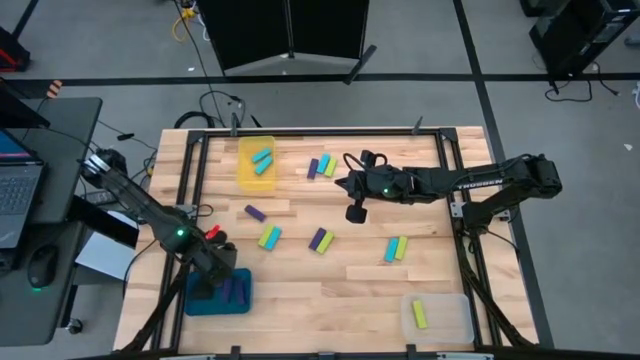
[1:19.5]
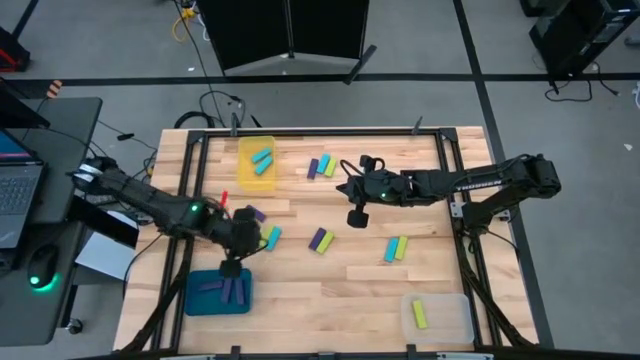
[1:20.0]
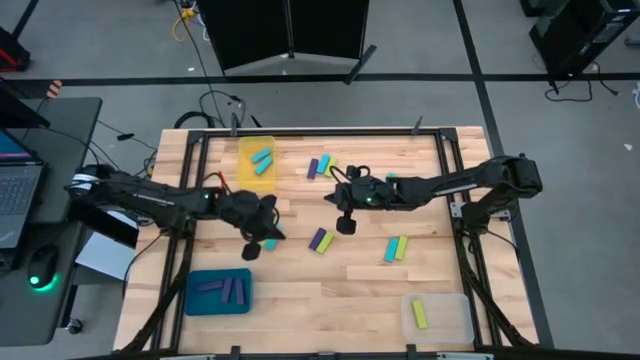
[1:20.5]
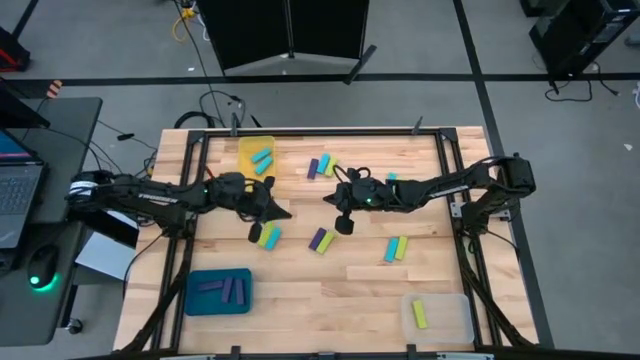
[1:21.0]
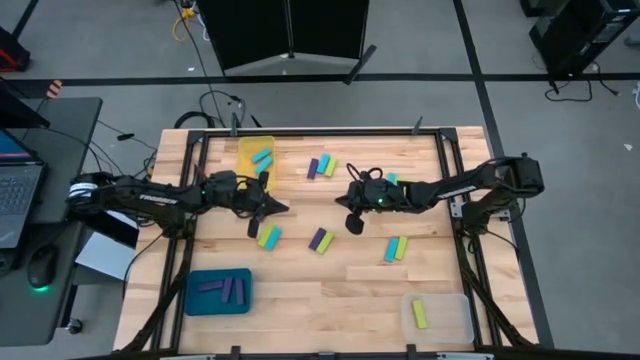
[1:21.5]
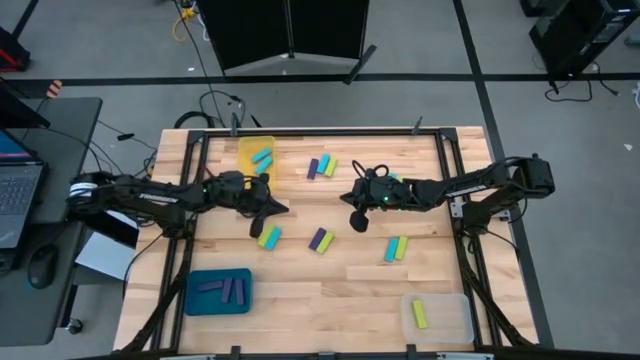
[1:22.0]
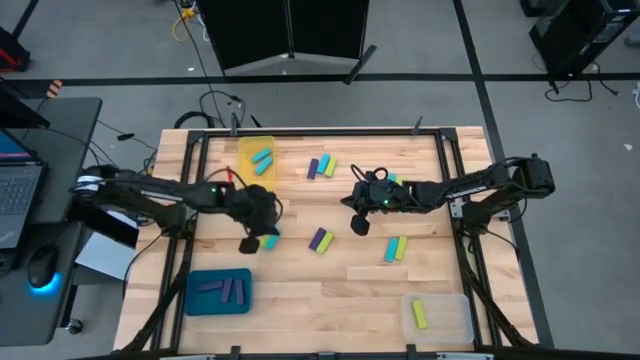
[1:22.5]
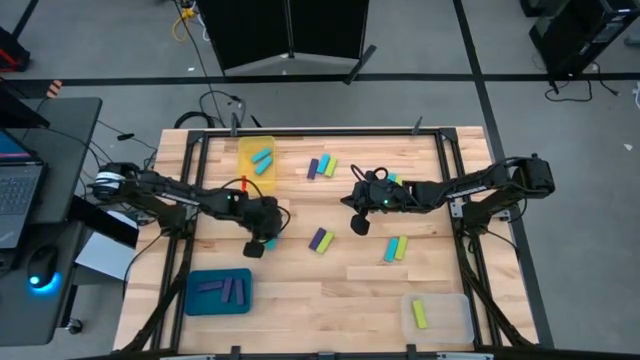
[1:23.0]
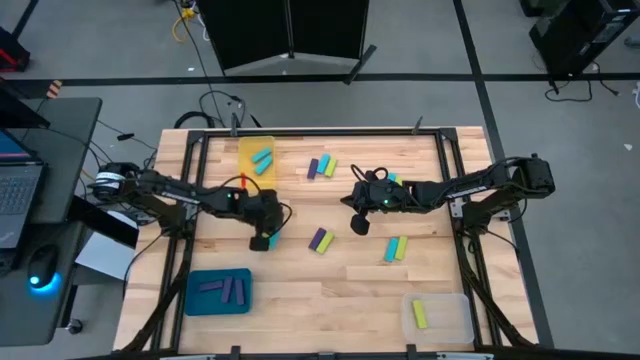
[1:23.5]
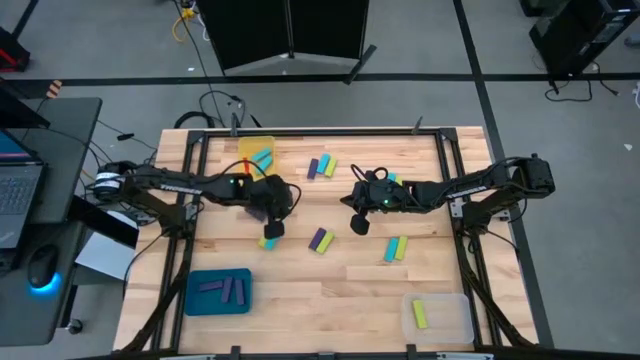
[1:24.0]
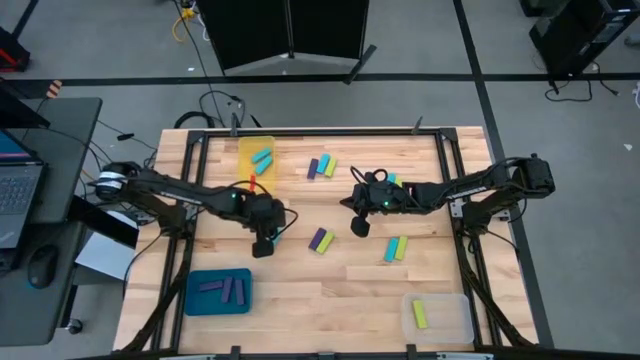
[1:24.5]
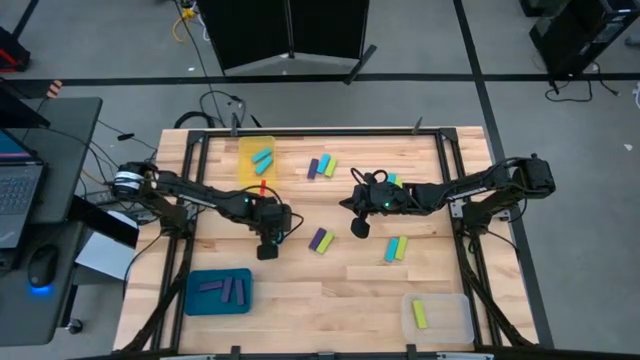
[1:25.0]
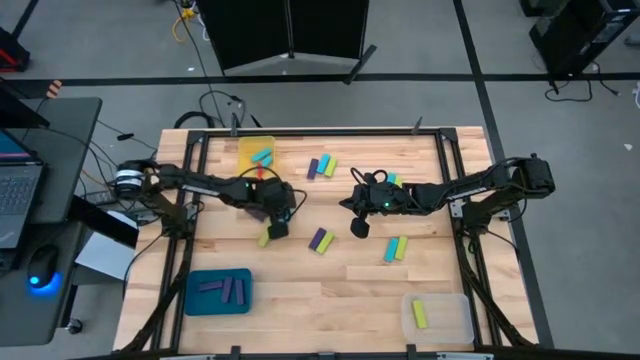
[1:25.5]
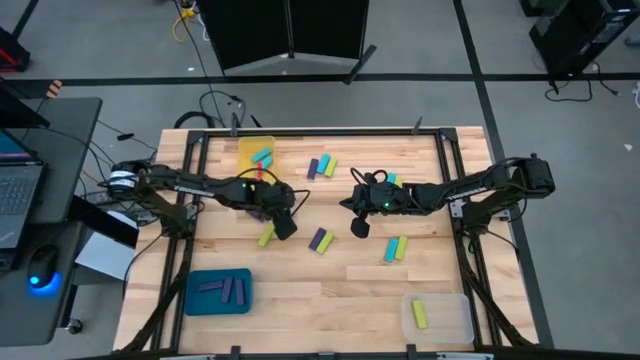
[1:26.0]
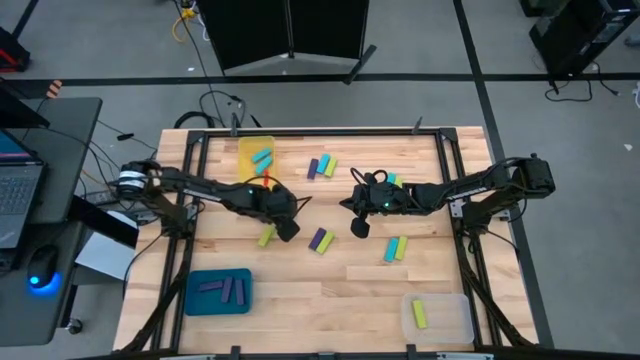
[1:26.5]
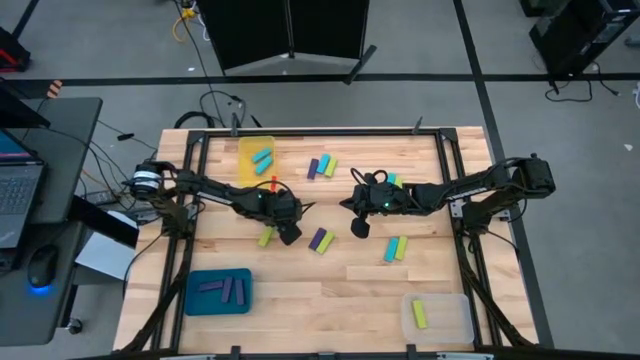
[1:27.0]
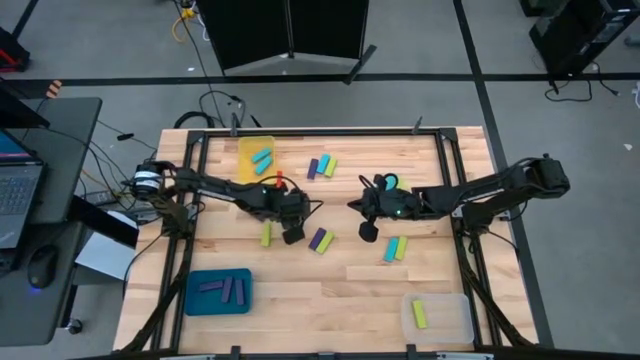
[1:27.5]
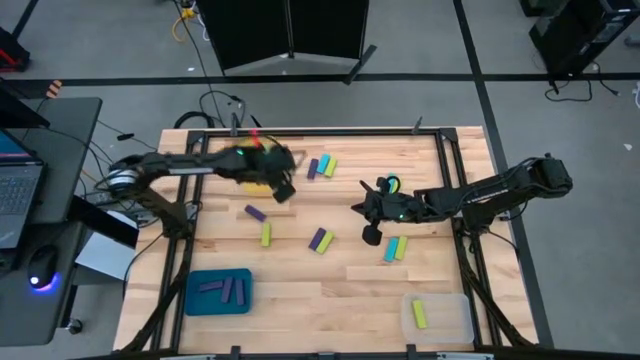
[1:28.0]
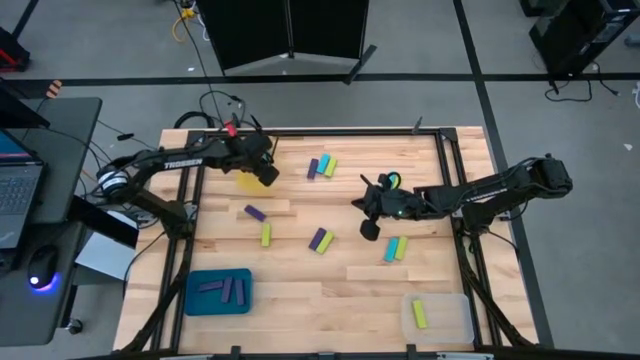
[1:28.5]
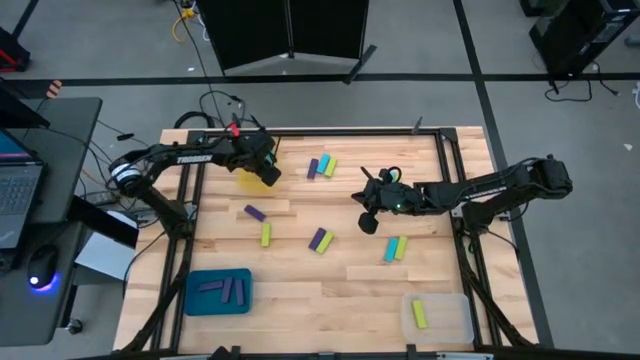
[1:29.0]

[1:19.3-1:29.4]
Task: Sort blocks
Put the blue block into the yellow bin

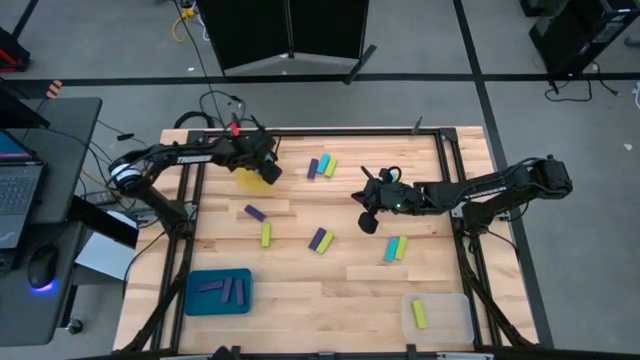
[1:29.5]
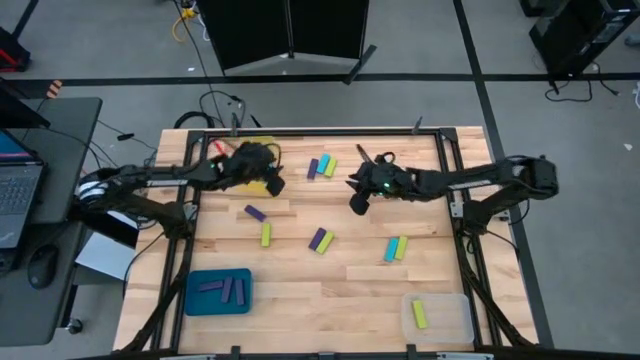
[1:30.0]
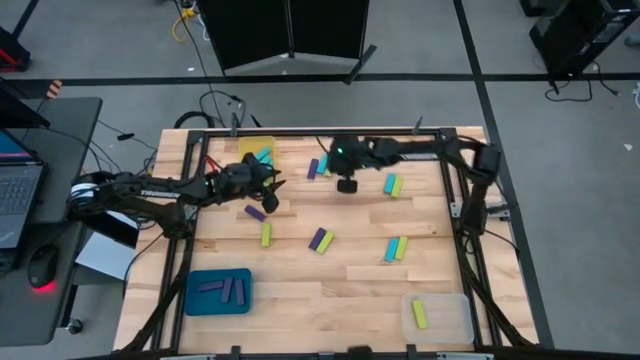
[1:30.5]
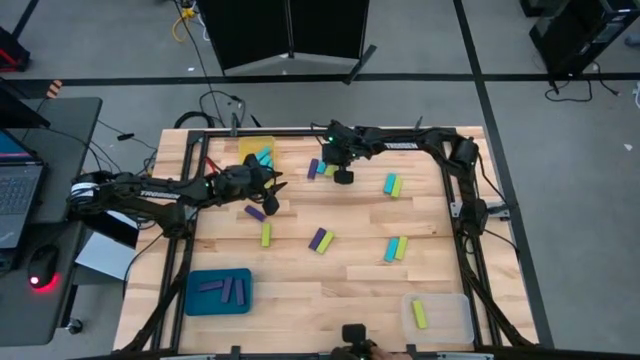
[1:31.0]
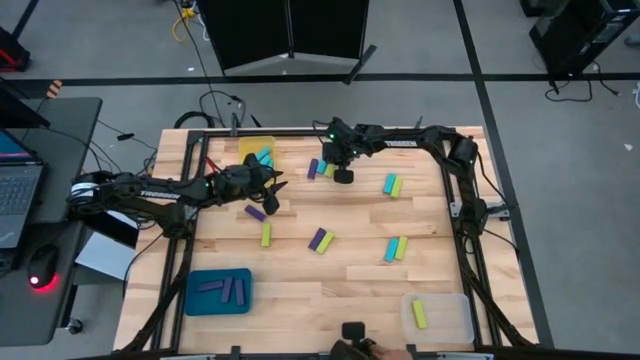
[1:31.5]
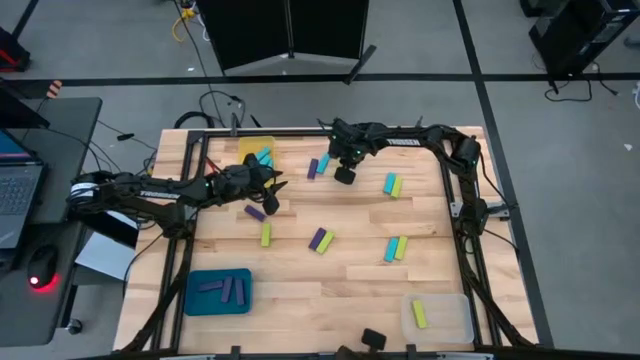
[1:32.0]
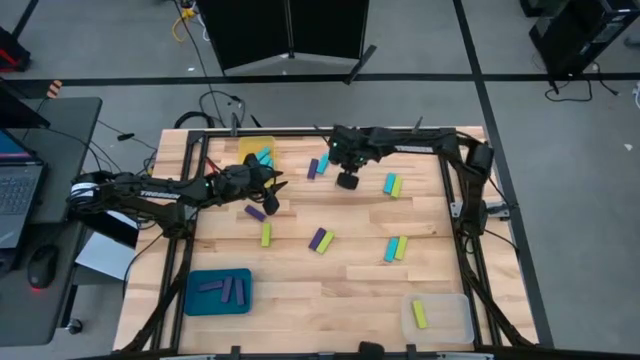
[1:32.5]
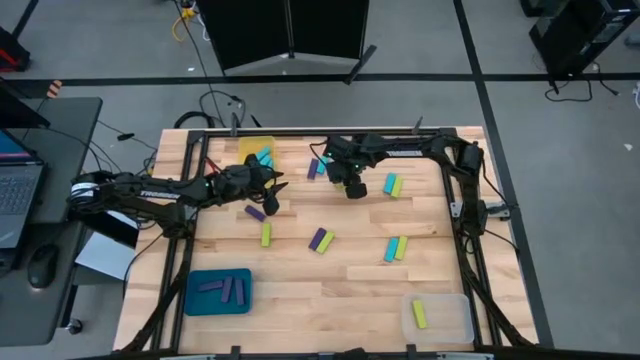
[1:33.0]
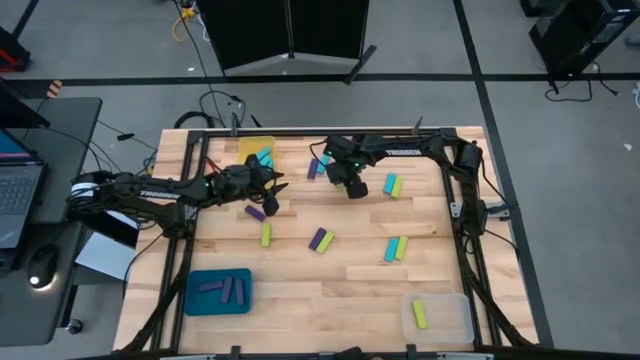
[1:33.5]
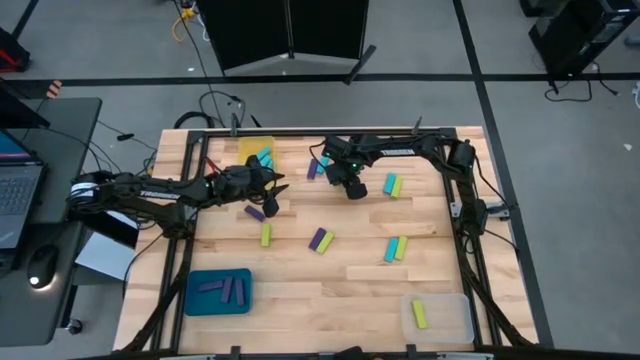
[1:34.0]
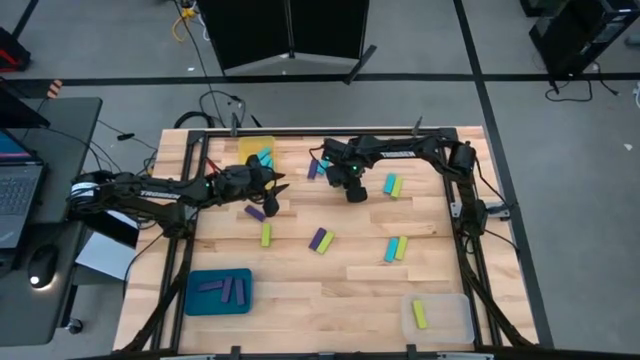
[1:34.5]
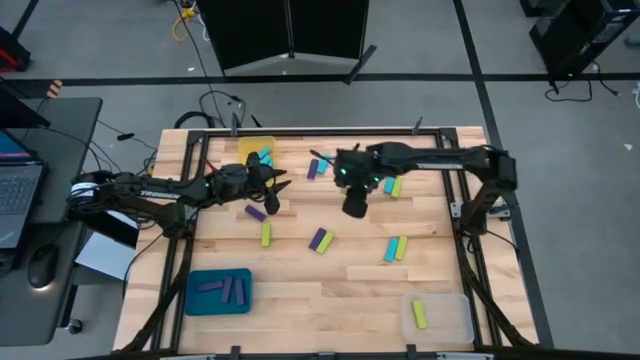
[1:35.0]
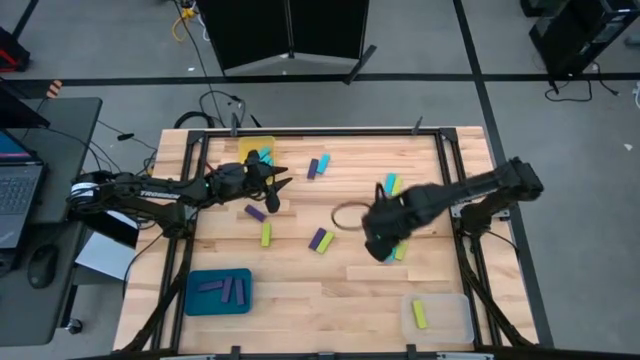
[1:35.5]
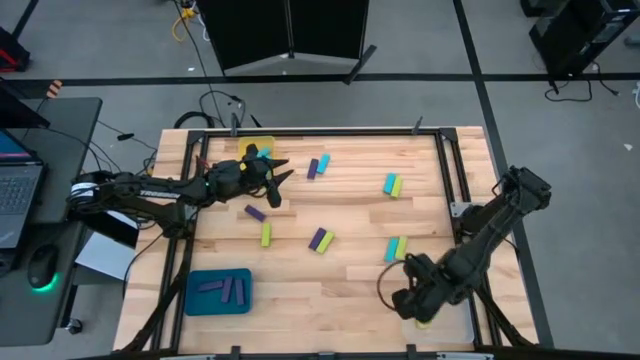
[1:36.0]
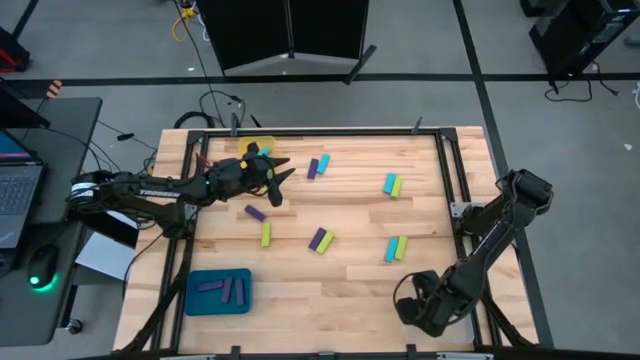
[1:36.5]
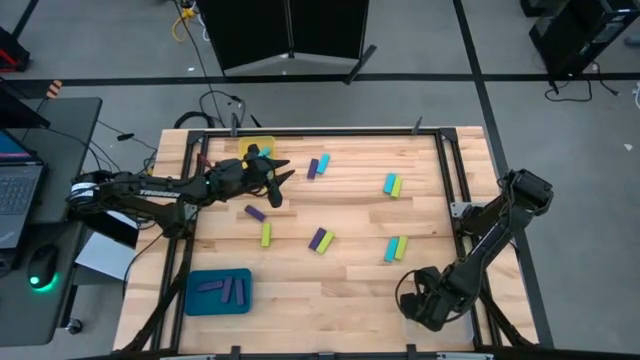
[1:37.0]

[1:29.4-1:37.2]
Put the green block into the transparent bin

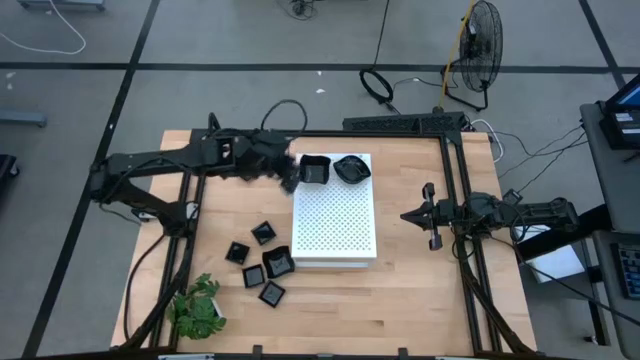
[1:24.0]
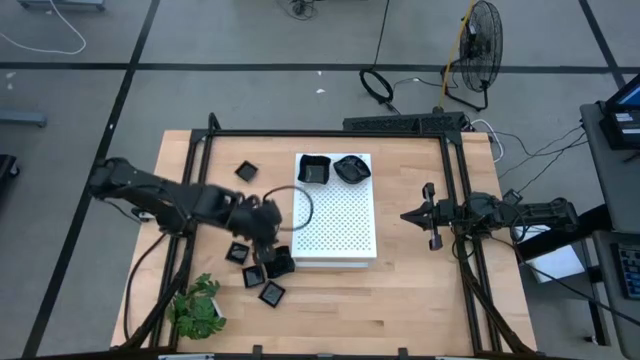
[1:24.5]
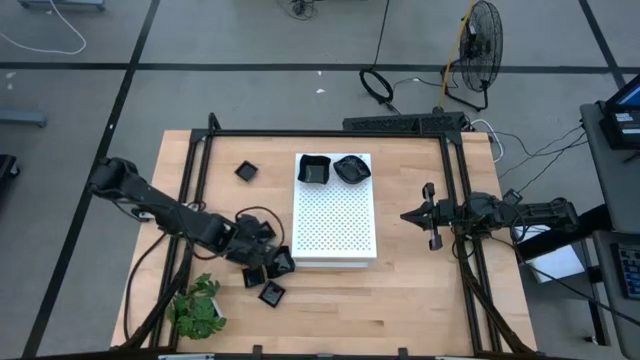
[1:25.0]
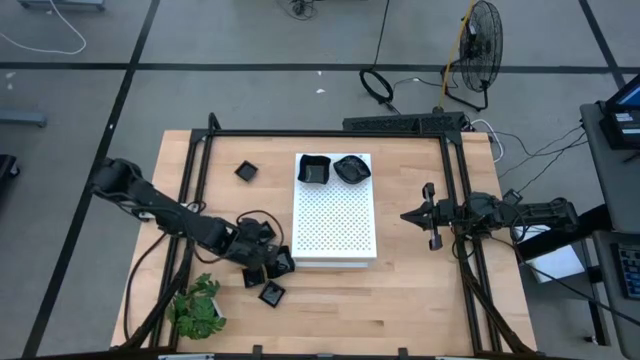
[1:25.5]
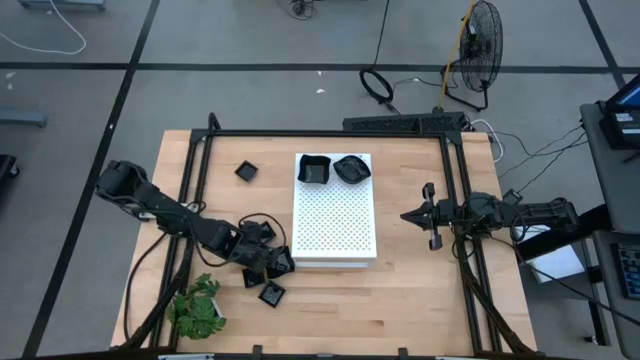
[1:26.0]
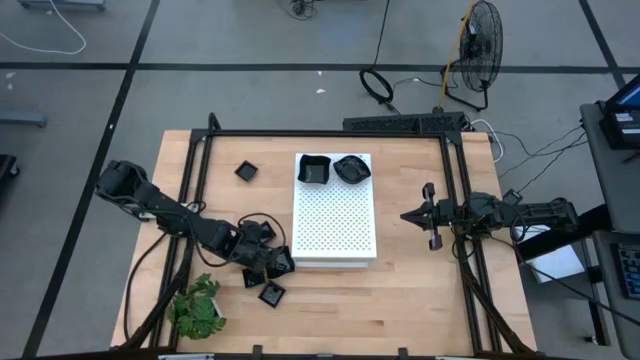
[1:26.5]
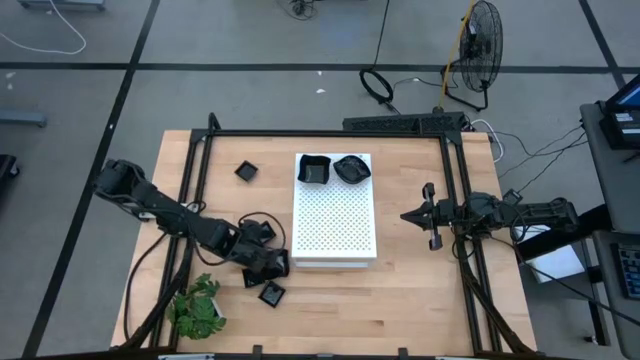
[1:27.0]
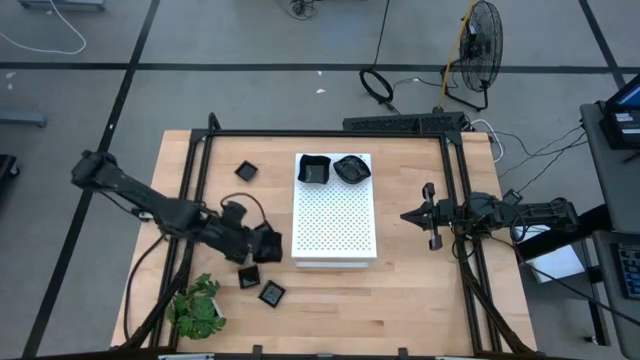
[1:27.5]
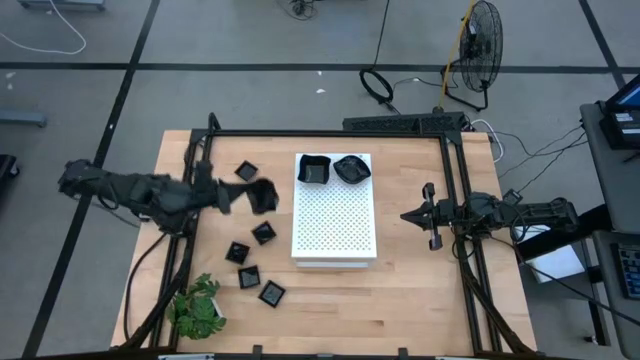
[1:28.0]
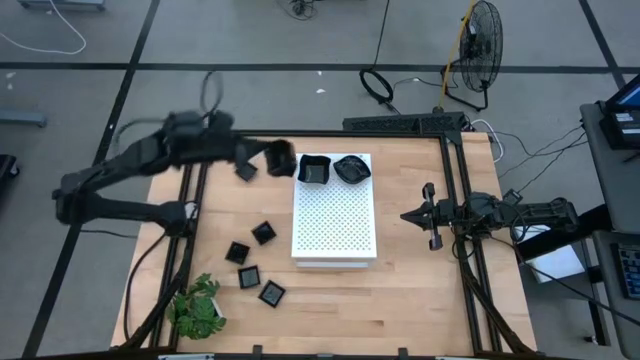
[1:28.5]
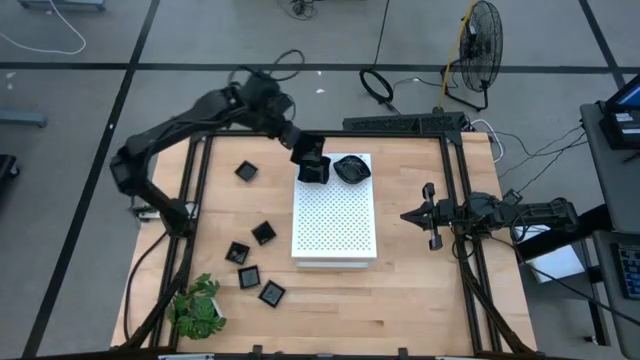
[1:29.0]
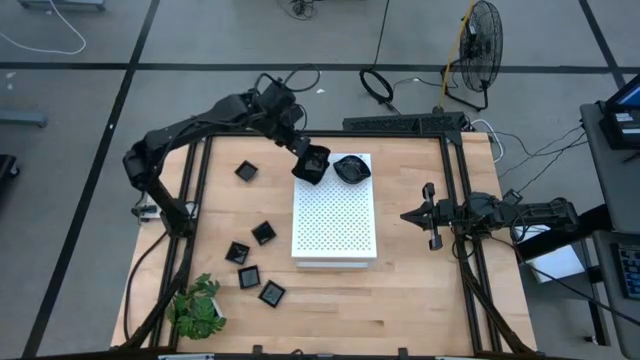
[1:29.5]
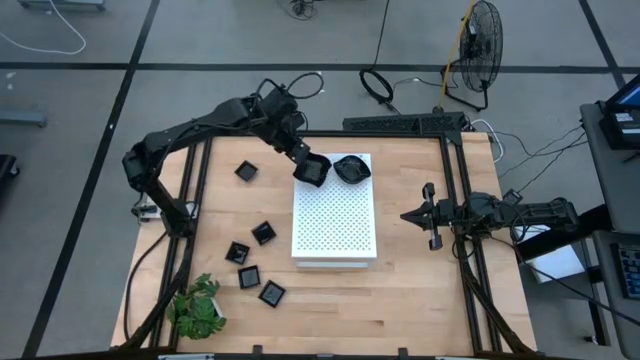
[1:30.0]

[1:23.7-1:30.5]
Task: Pick & Place Mini shaped plates
Stack the black distorted square plate on top of the other black distorted square plates on the shelf
